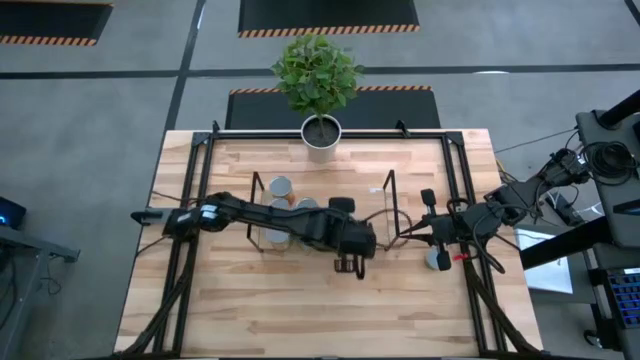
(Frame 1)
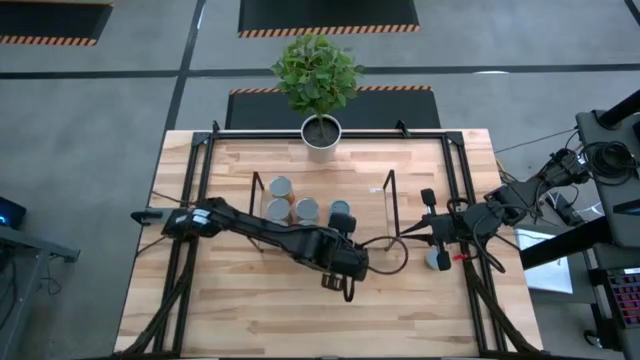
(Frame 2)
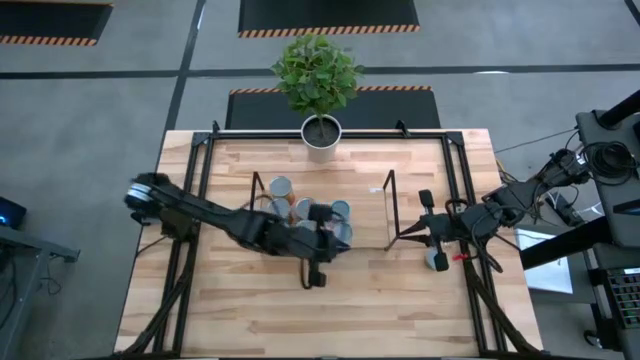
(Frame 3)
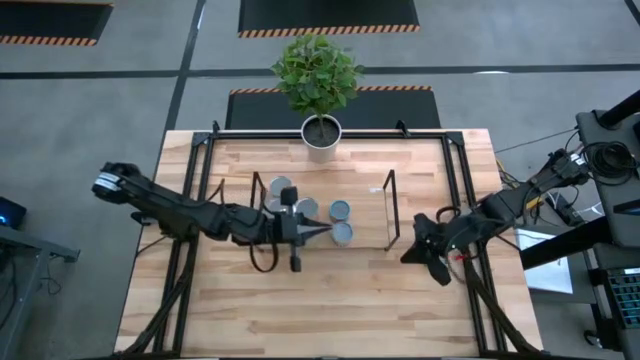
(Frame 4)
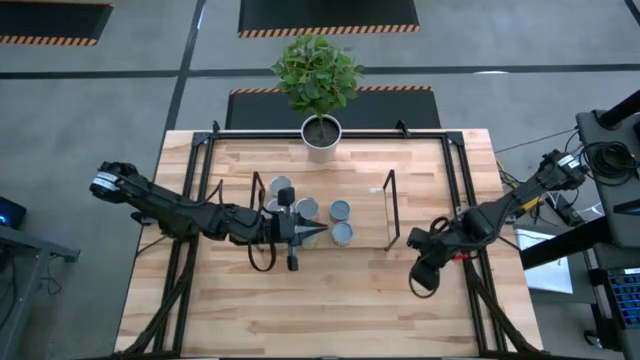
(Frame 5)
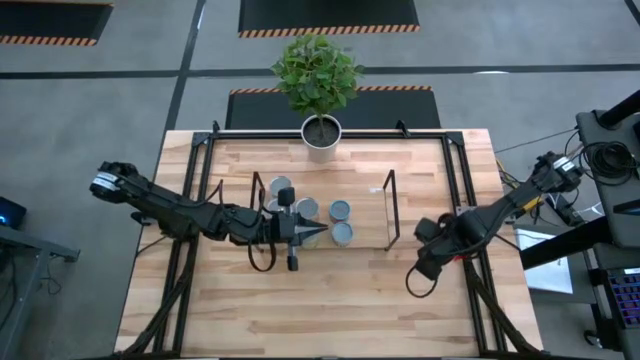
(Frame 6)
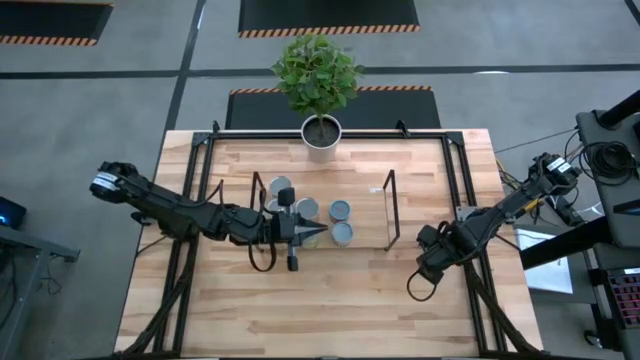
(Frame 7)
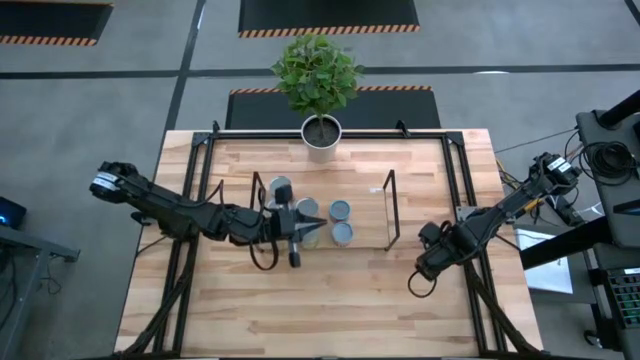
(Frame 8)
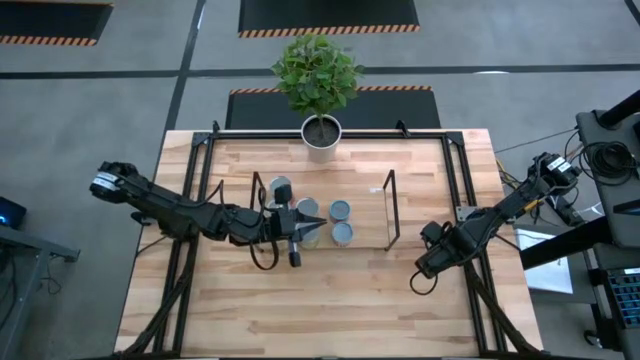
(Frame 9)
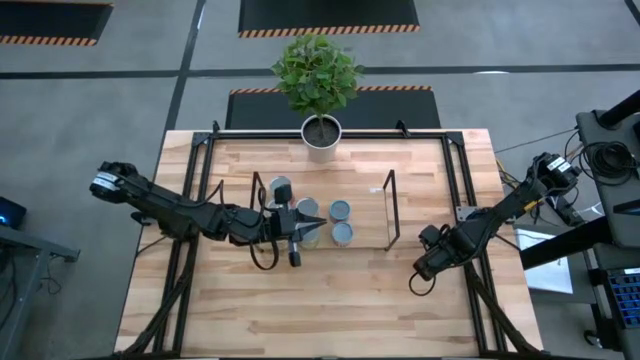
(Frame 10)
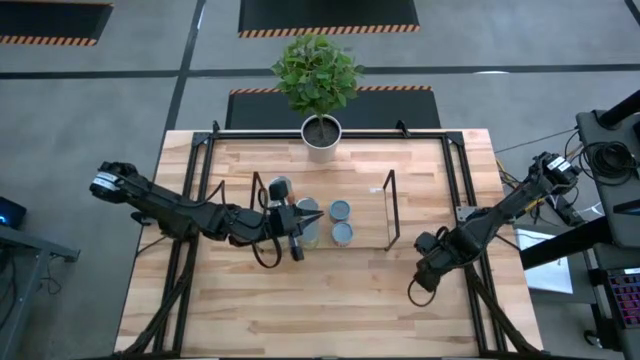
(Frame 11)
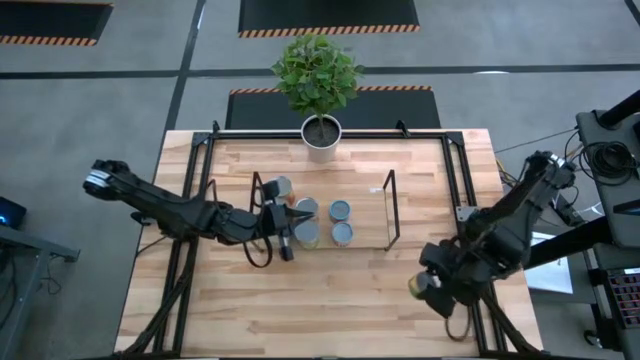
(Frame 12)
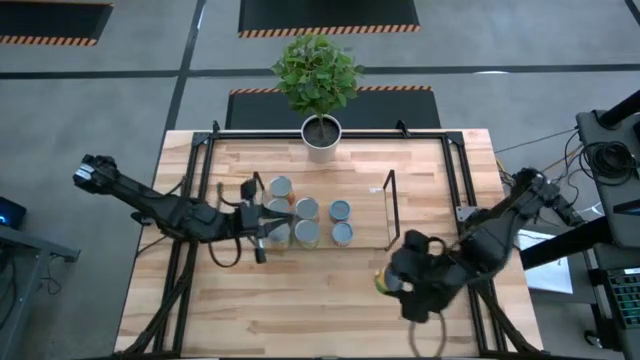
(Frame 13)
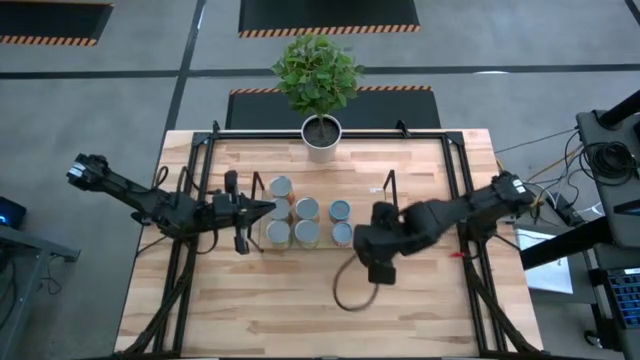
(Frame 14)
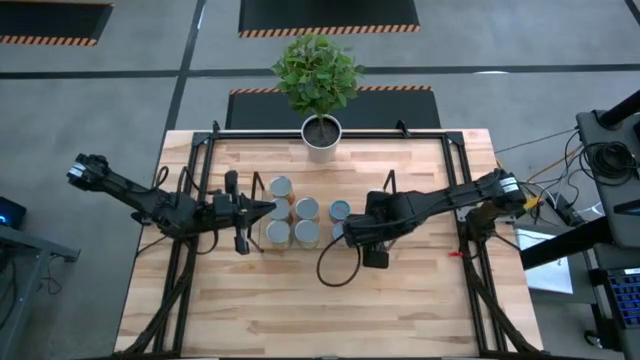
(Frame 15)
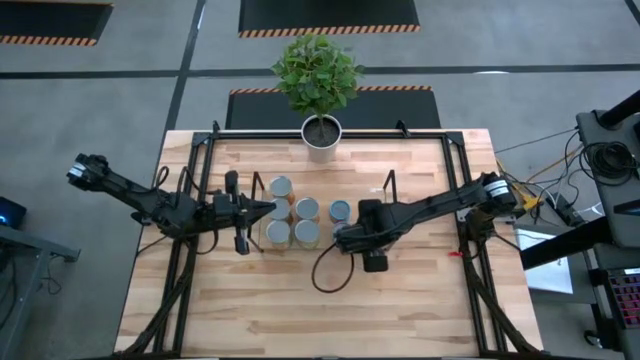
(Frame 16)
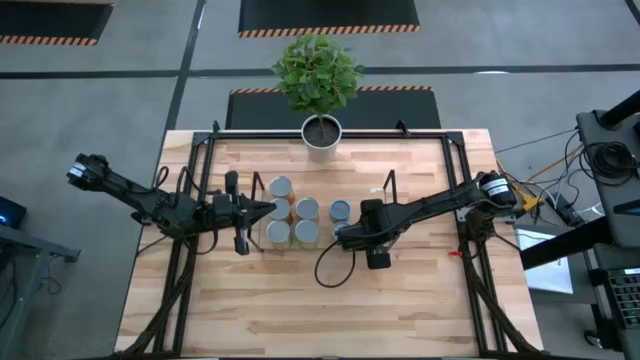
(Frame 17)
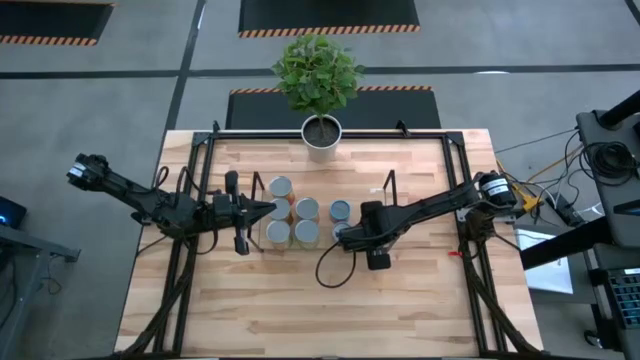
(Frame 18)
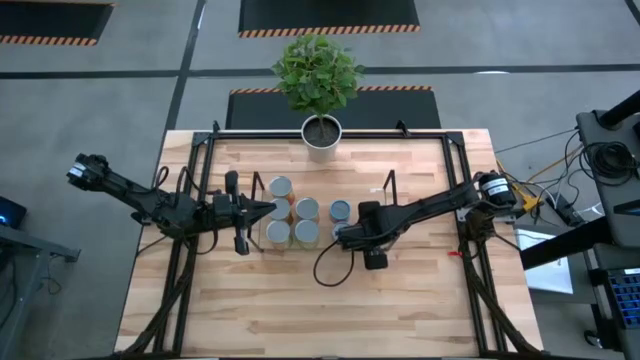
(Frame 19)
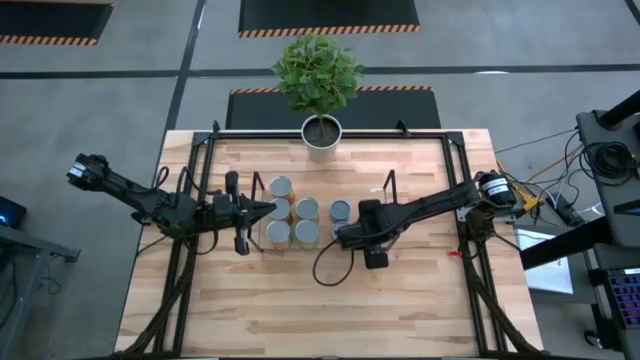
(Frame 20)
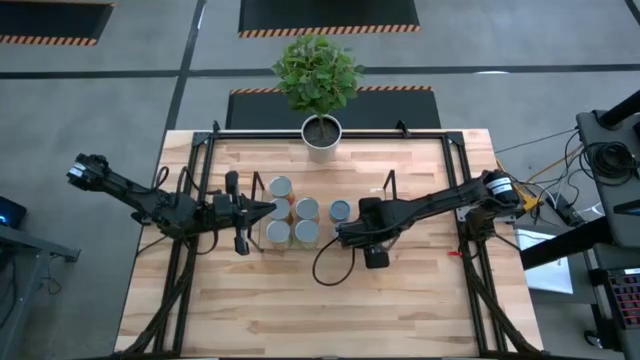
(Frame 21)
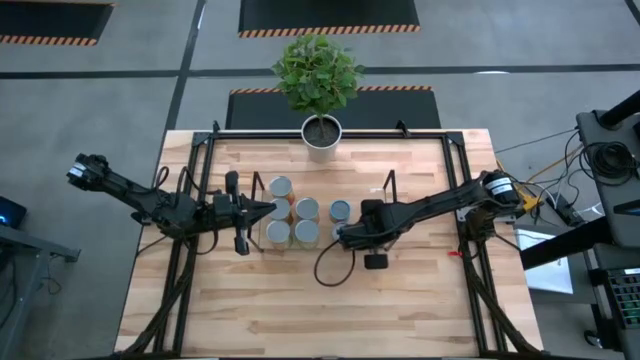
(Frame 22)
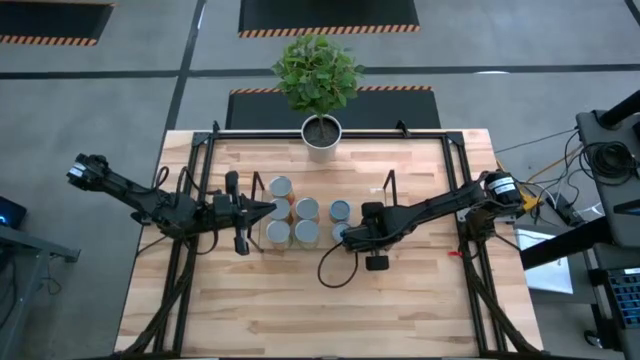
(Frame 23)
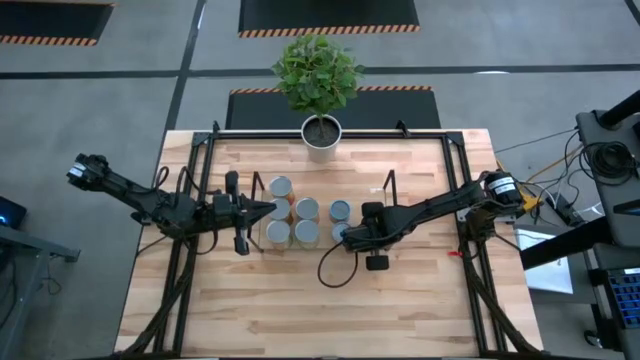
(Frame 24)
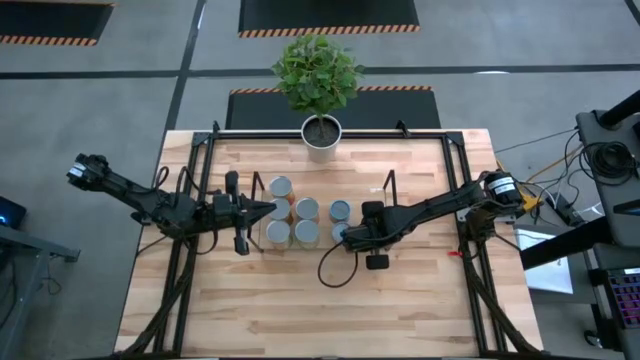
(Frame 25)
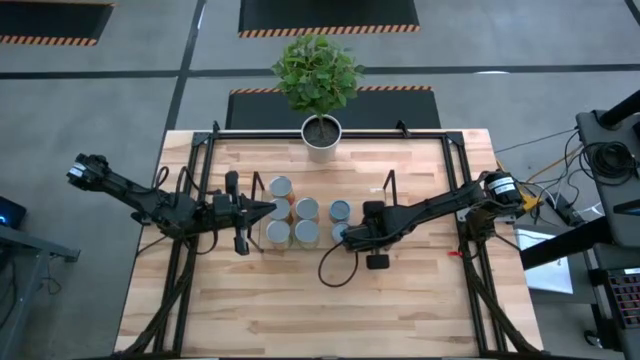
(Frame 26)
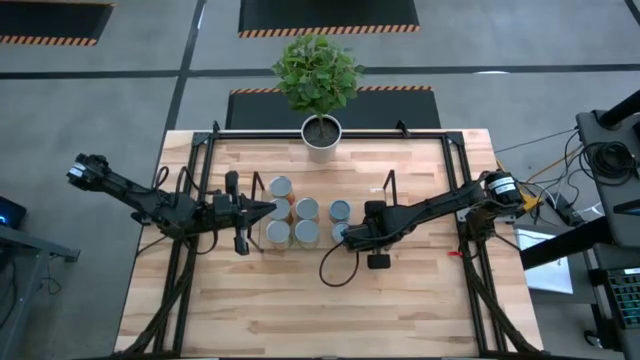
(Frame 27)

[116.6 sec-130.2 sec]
Task: Pick and place cans onto a shelf
Put the canned mushrooms on the shelf

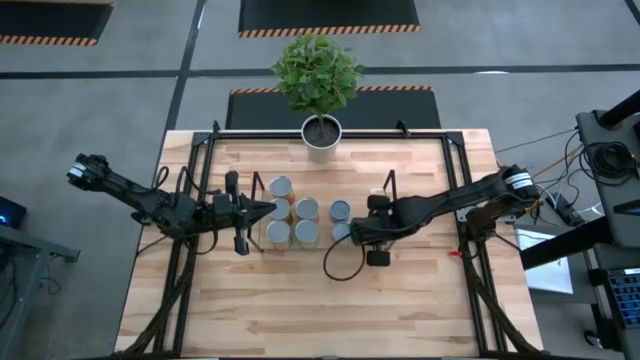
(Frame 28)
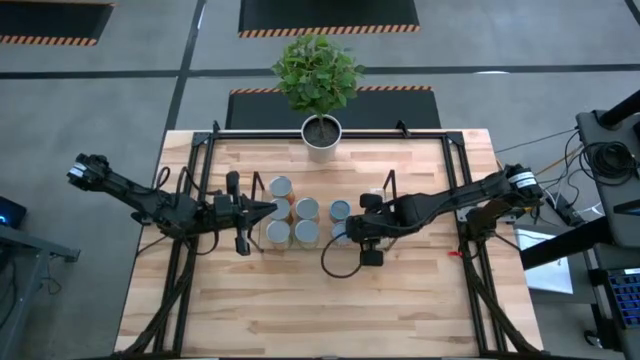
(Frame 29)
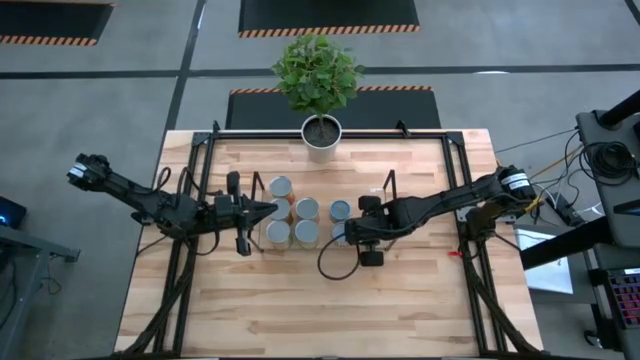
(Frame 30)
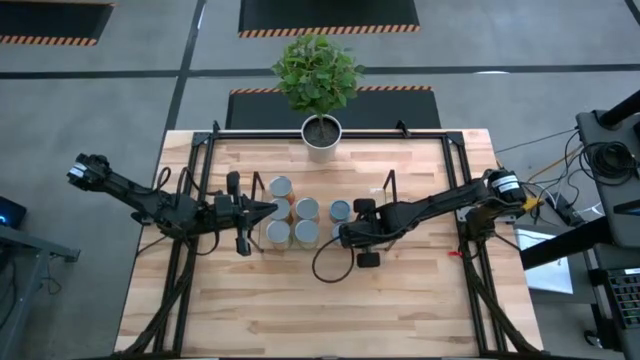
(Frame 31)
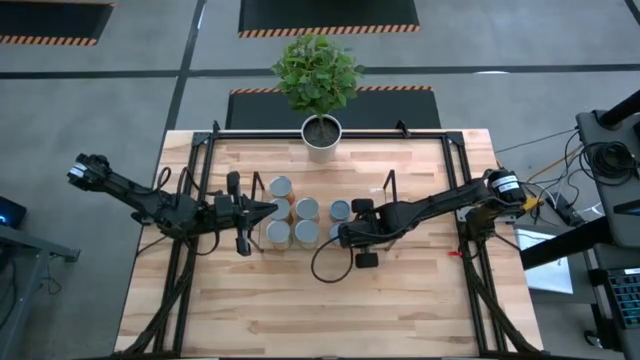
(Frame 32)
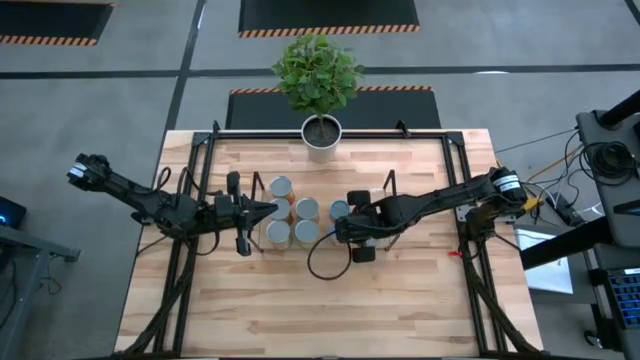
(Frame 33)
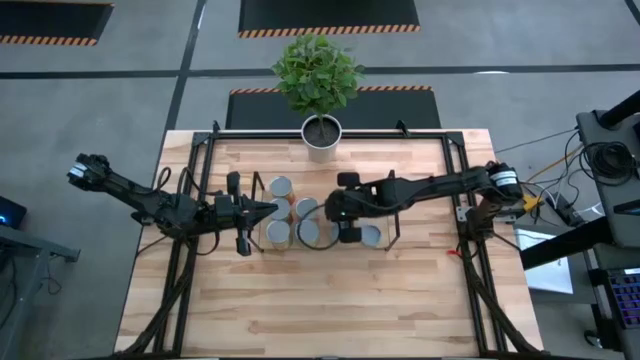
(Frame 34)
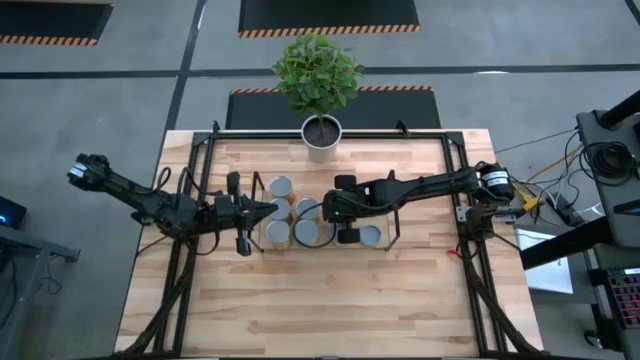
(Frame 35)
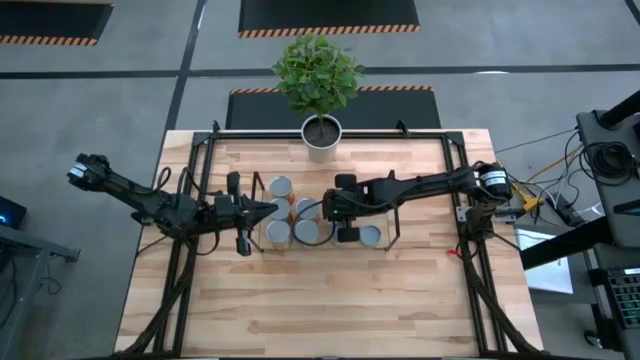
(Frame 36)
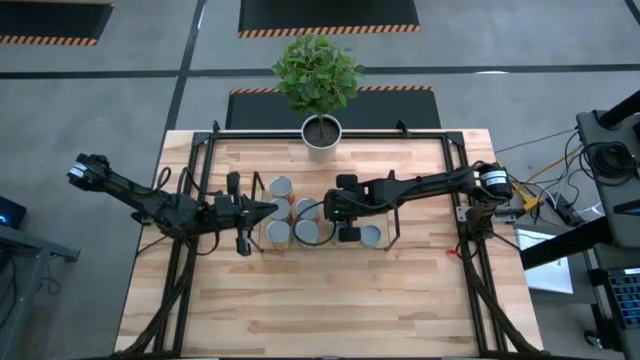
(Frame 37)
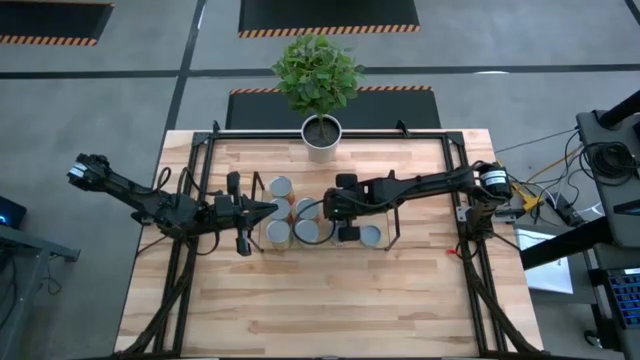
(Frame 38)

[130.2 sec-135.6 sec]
Adjust the cans on the shelf

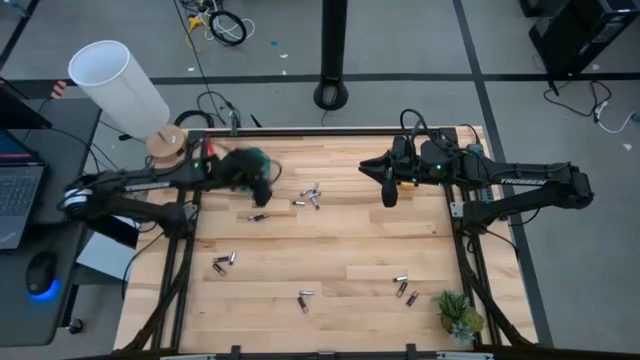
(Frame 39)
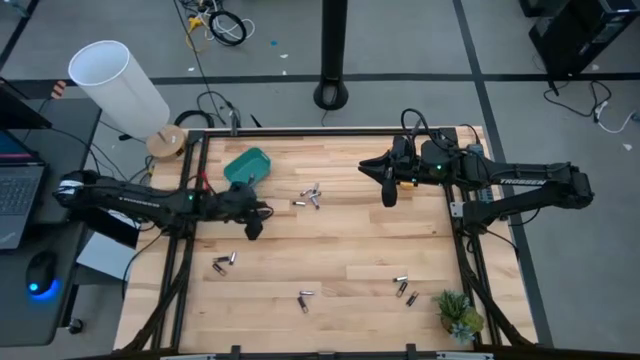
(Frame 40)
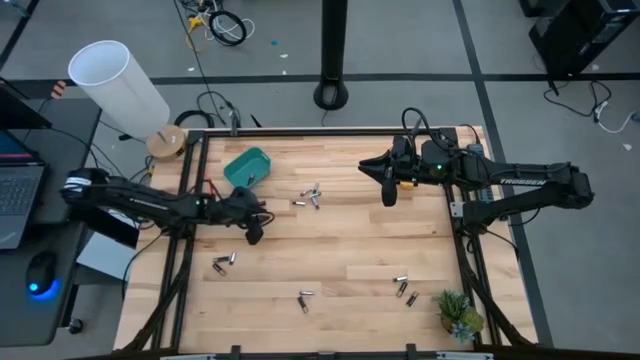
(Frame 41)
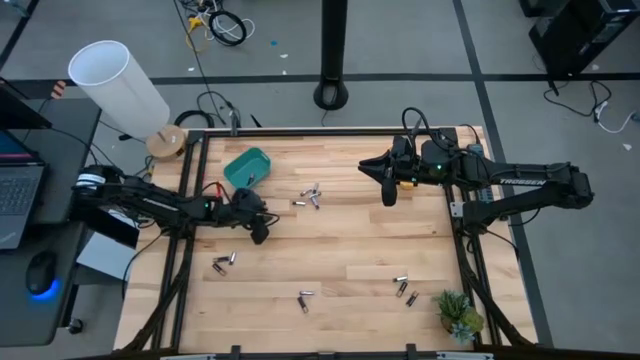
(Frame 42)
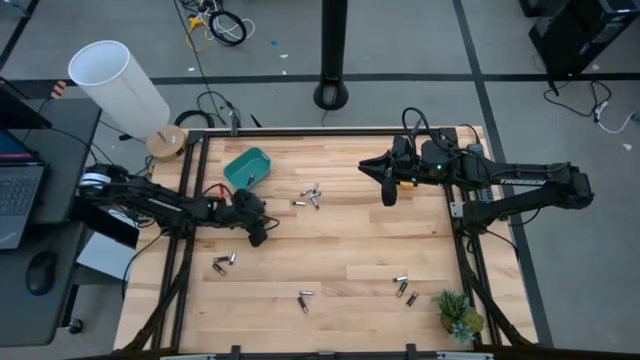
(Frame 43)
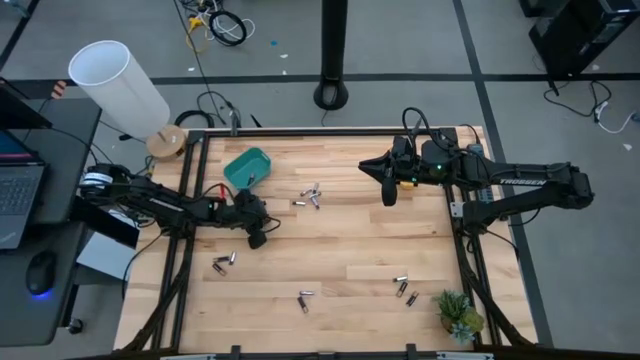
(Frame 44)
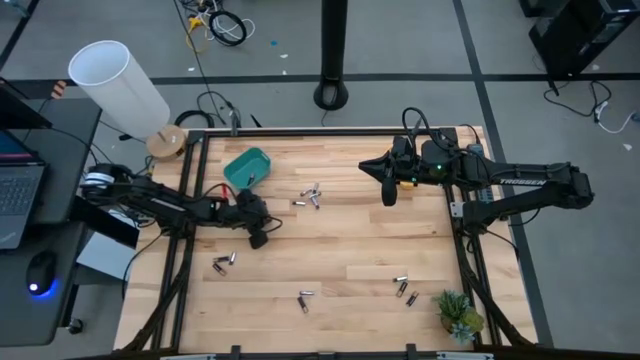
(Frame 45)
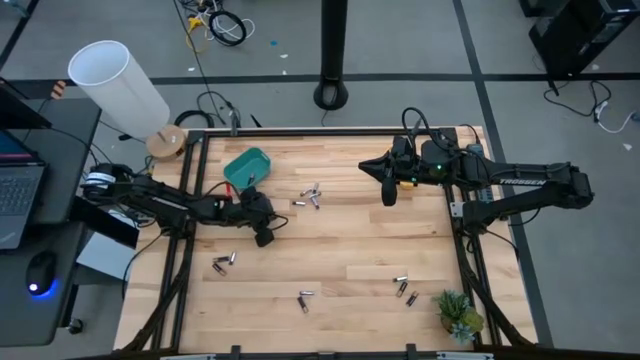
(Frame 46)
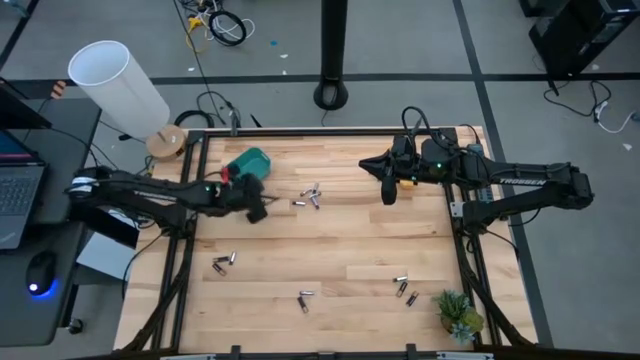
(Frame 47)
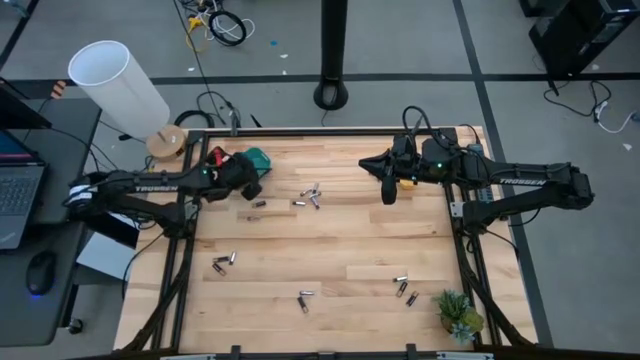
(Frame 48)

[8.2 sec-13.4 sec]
Task: Sort batteries
Put the black battery into the blue bin
